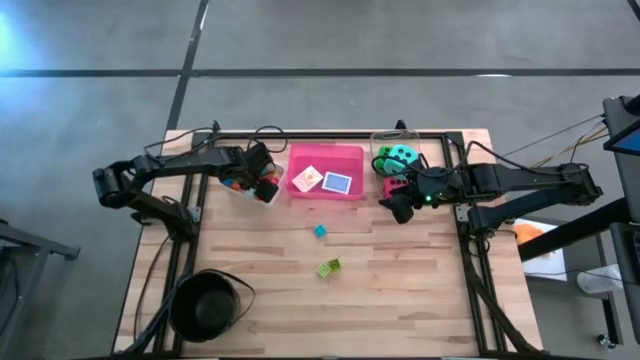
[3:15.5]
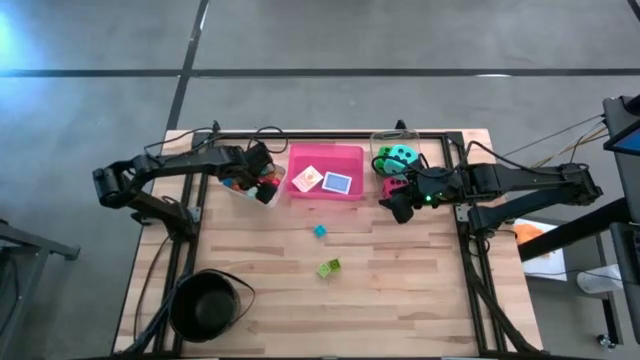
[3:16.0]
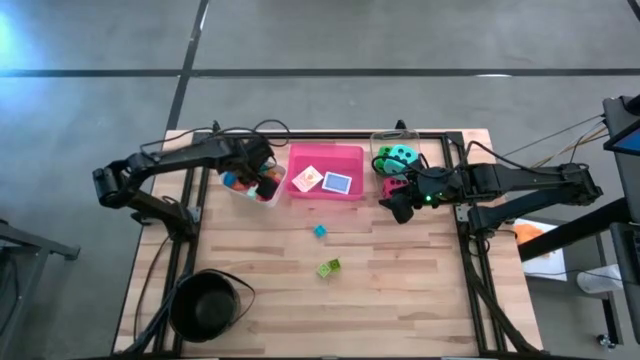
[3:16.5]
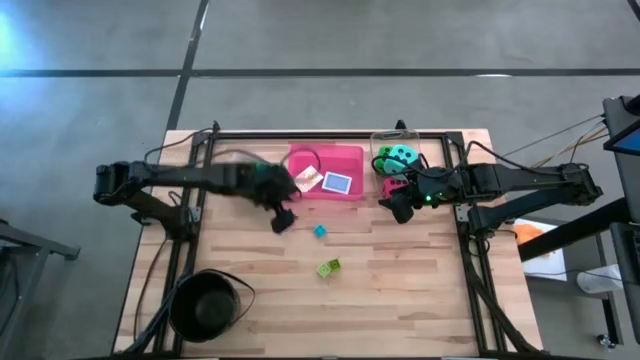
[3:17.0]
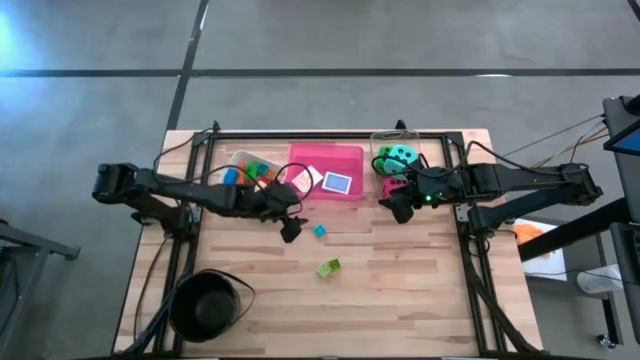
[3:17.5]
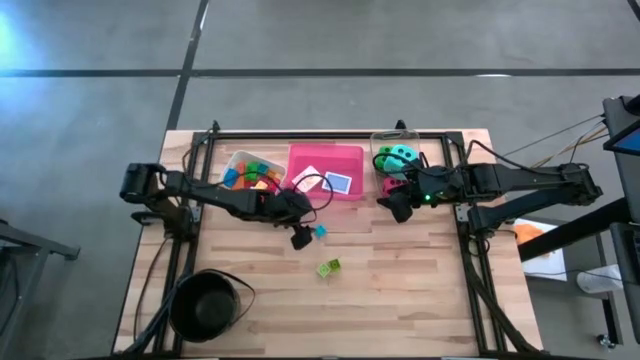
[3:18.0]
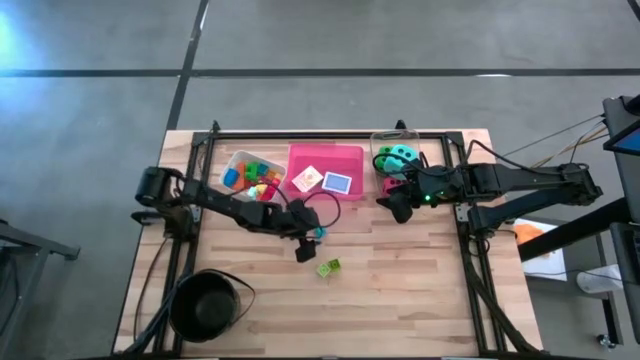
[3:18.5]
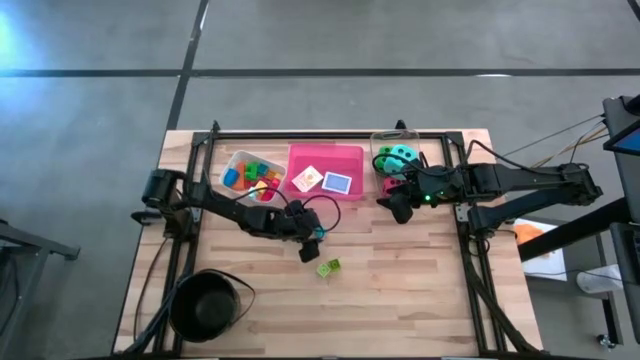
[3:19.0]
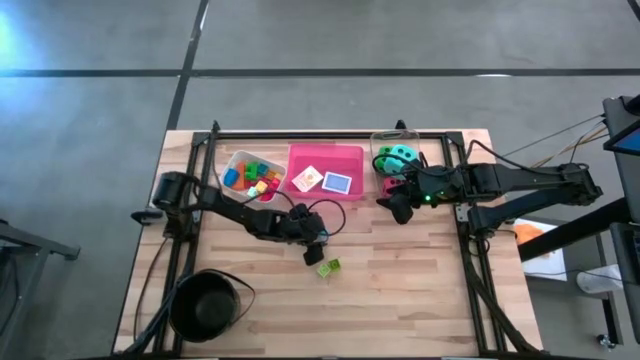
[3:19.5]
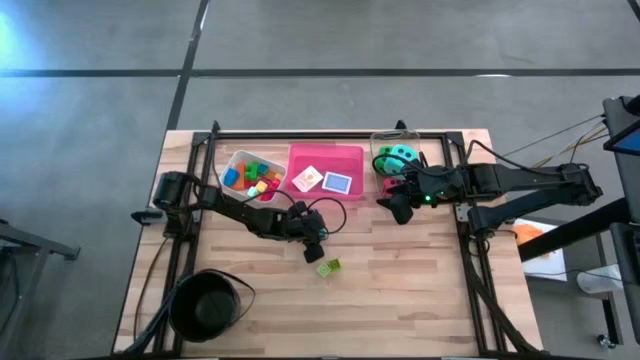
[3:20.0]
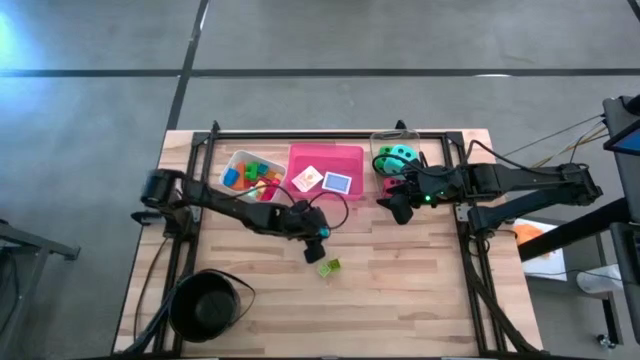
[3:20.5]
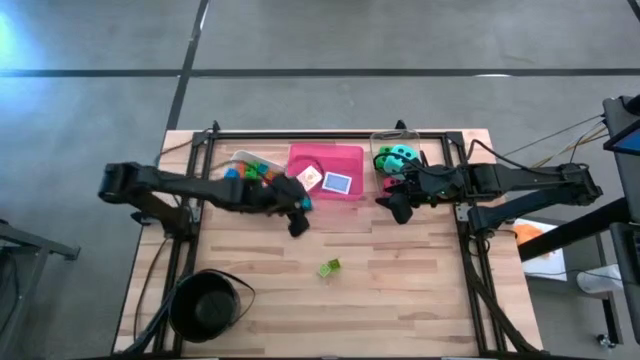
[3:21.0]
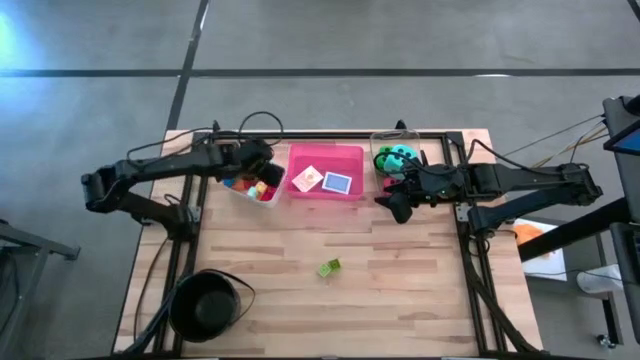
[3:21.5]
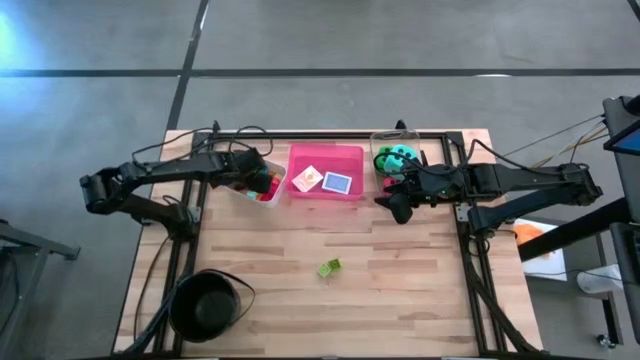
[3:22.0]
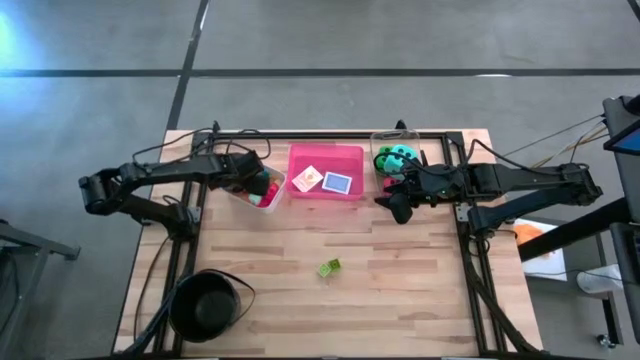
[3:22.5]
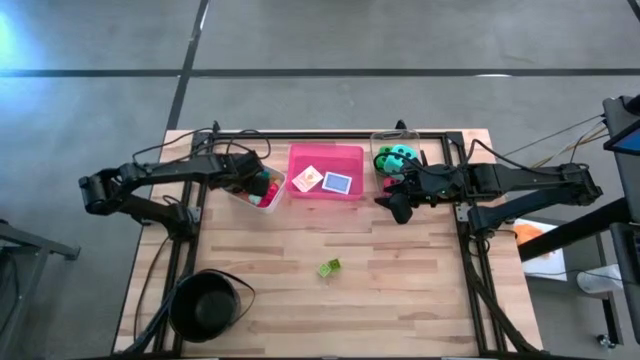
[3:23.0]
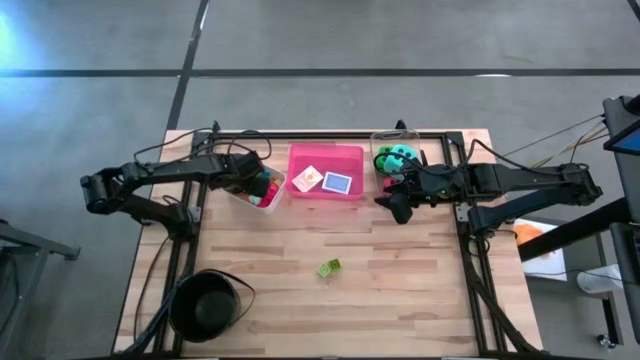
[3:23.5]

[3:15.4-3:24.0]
Task: Pick & Place Toys
Put the blue game piece into the white bin

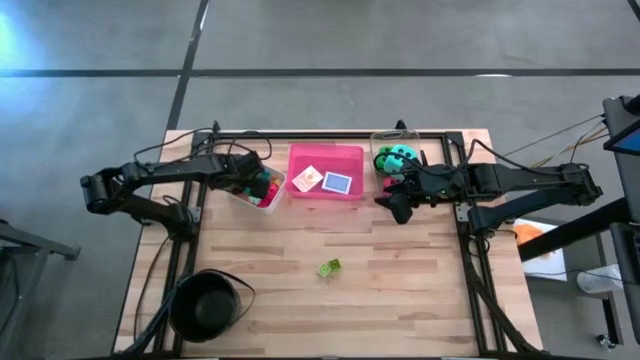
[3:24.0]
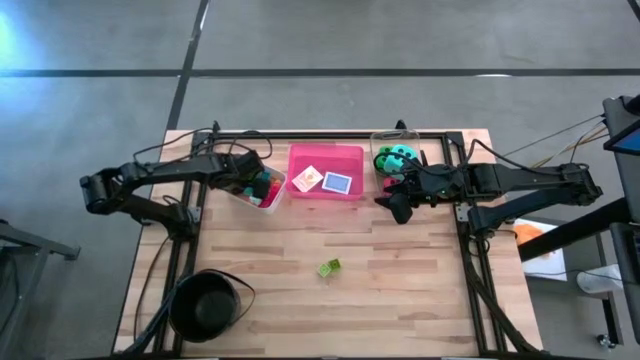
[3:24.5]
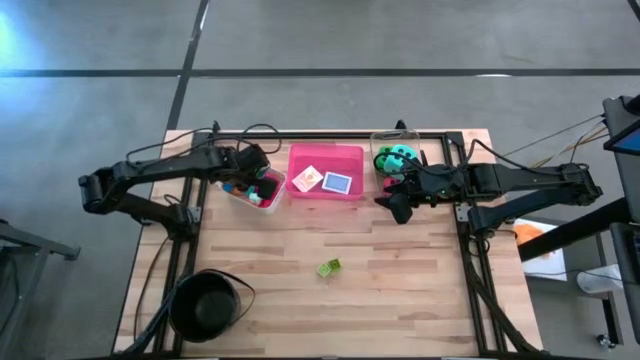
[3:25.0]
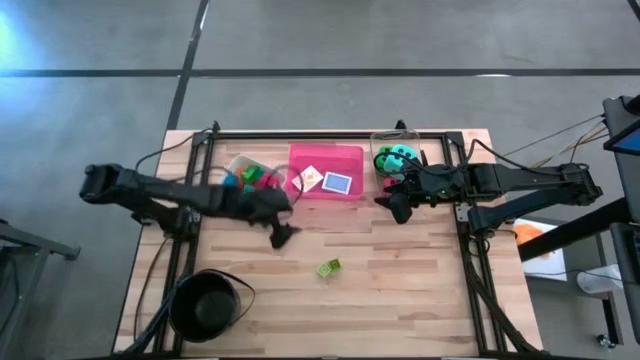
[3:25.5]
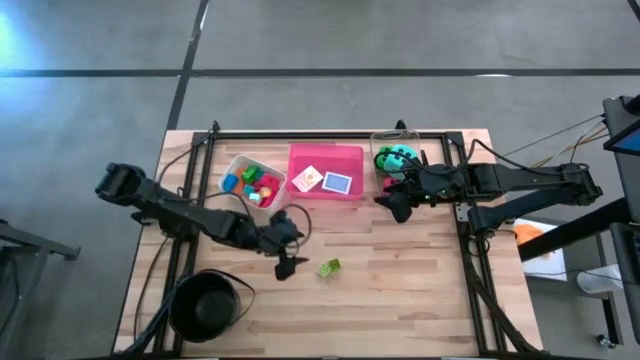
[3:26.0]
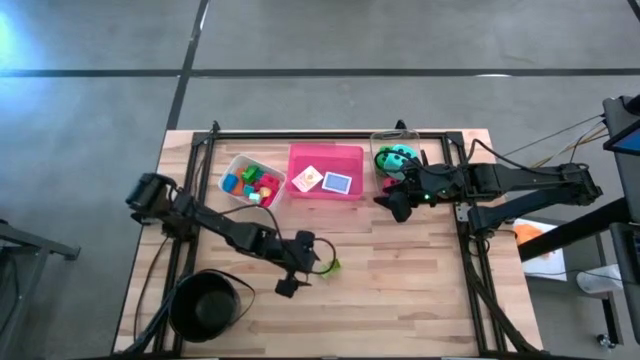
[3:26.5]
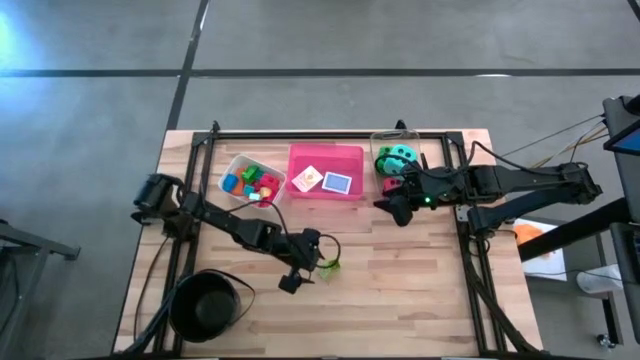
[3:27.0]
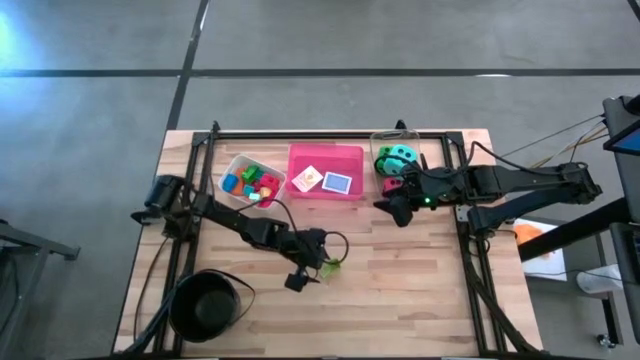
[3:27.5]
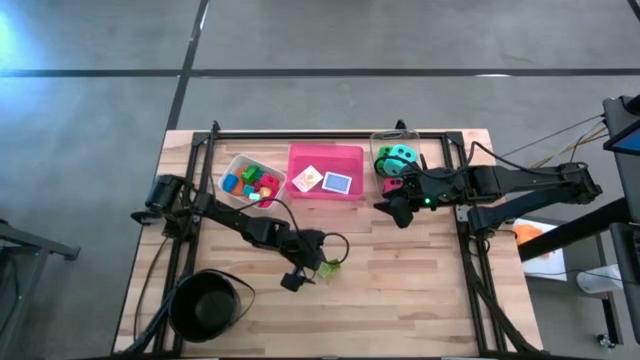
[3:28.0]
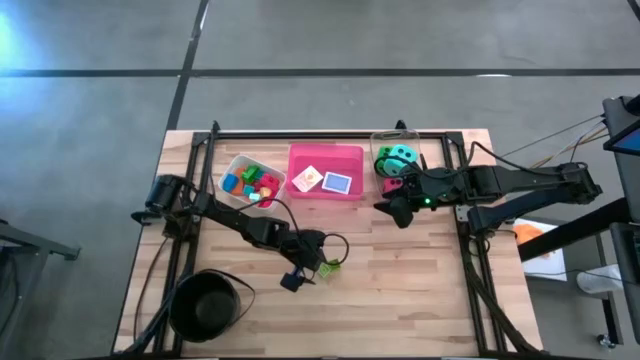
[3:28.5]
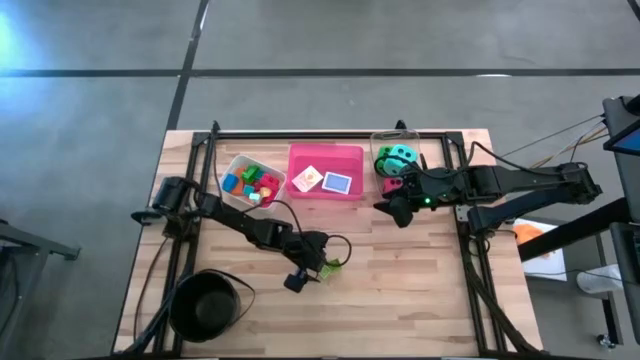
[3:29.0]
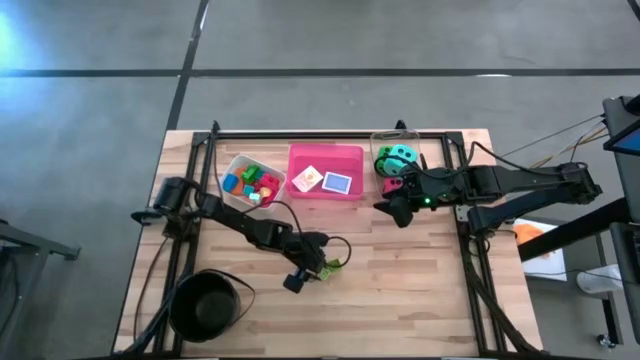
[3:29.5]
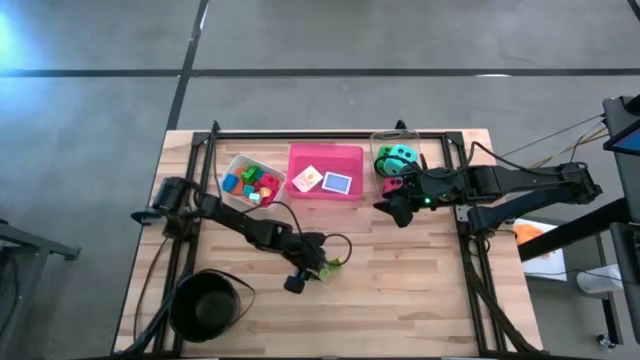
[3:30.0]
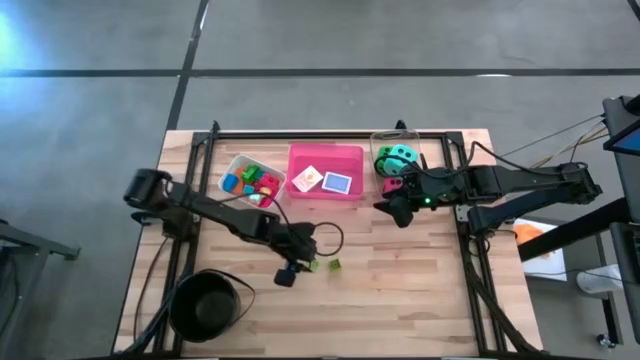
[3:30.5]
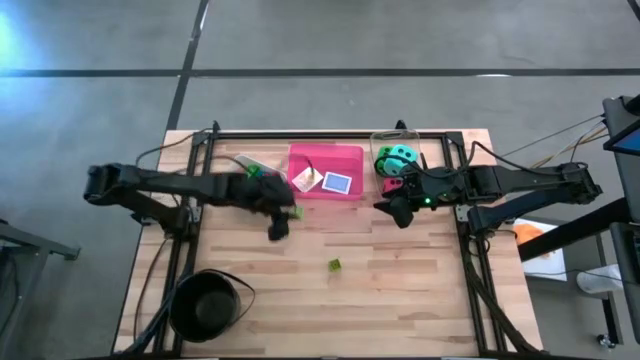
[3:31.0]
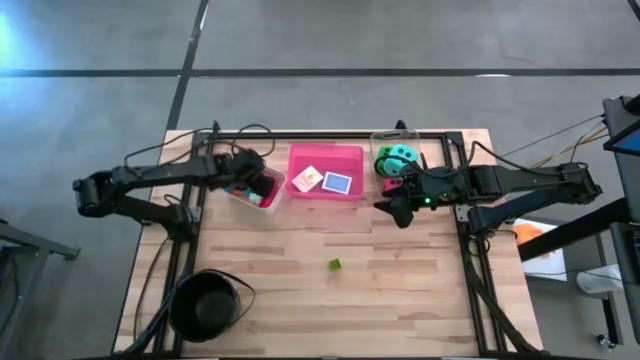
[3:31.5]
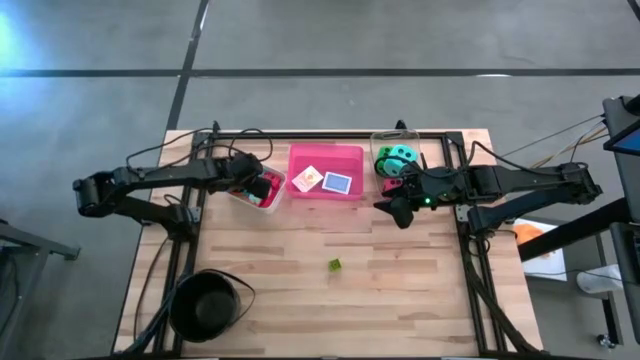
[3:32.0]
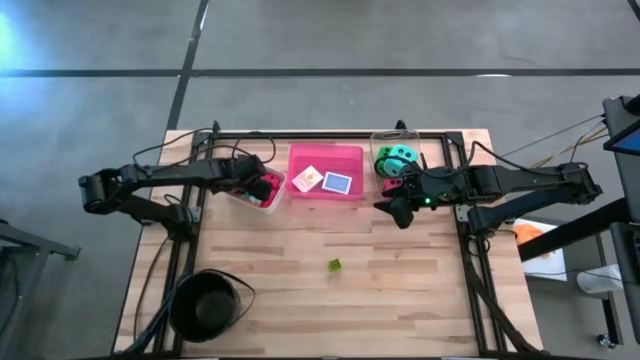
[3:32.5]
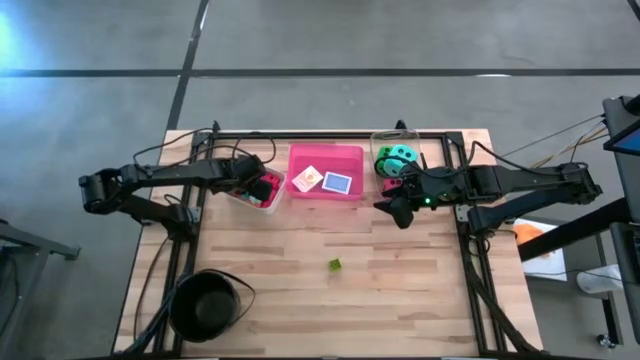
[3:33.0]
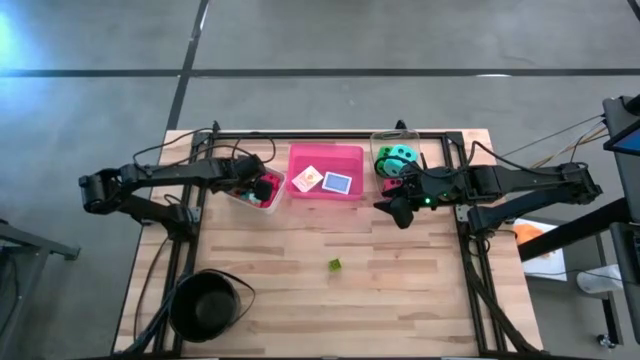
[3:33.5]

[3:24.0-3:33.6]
Put the light green game piece into the white bin

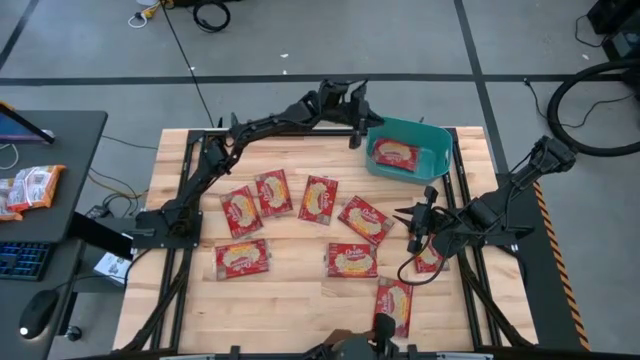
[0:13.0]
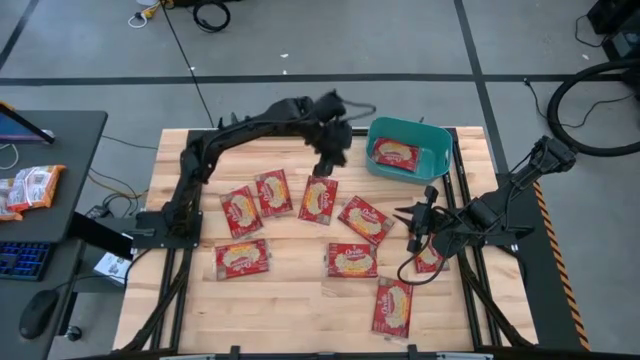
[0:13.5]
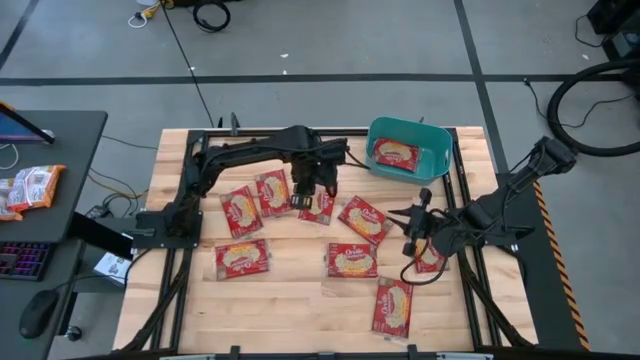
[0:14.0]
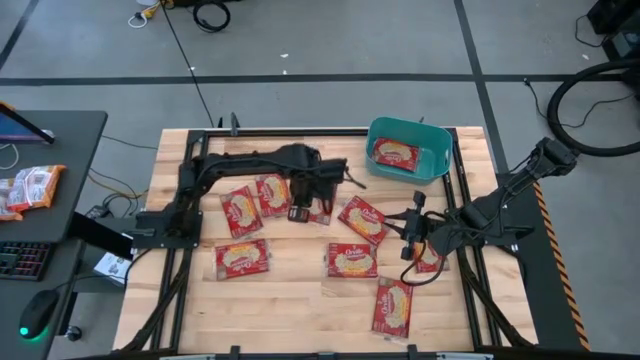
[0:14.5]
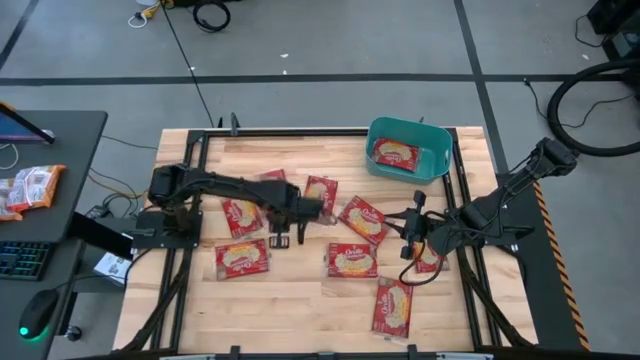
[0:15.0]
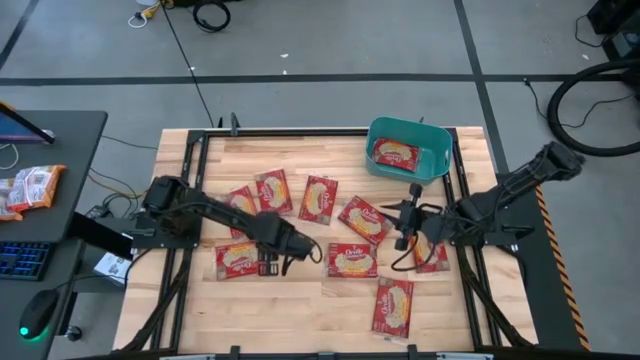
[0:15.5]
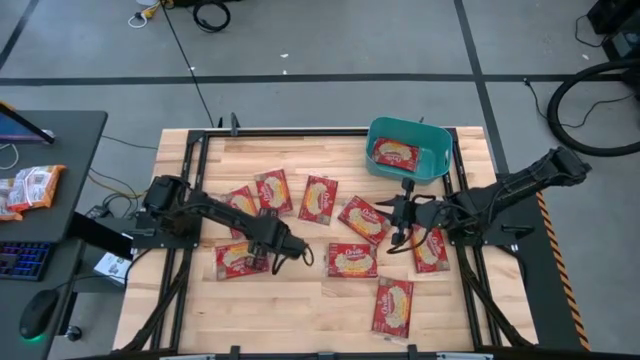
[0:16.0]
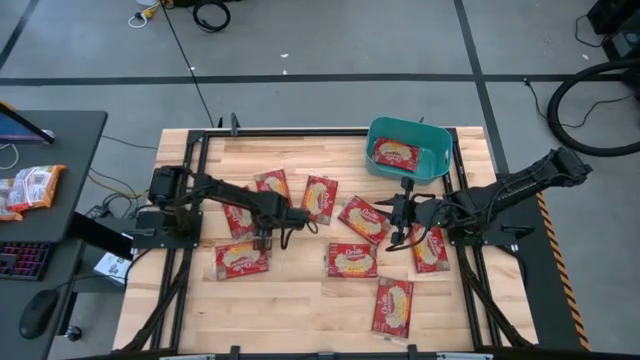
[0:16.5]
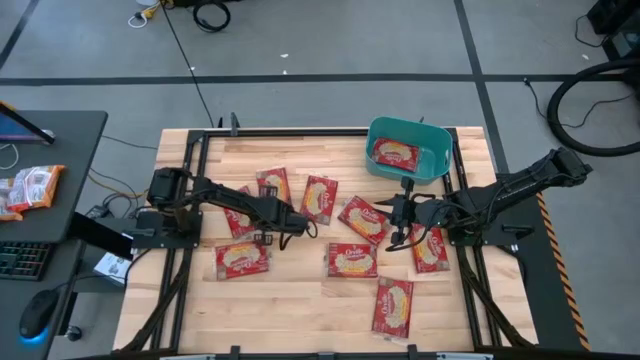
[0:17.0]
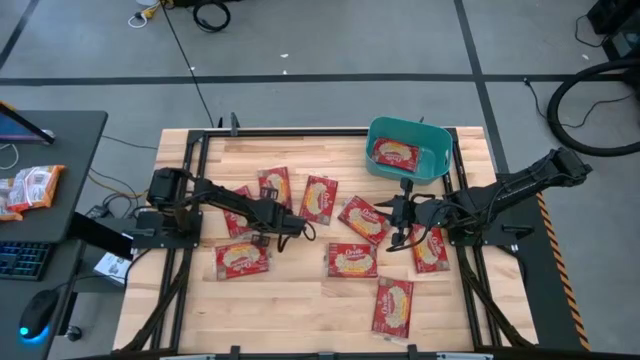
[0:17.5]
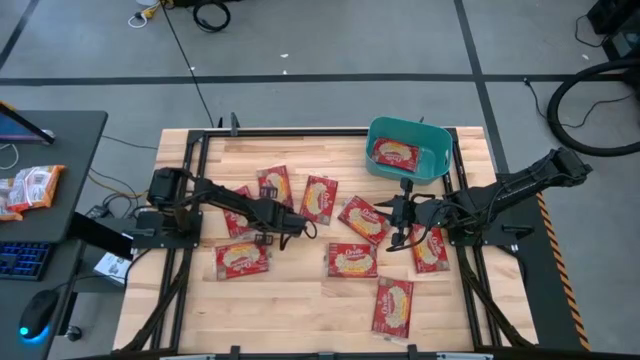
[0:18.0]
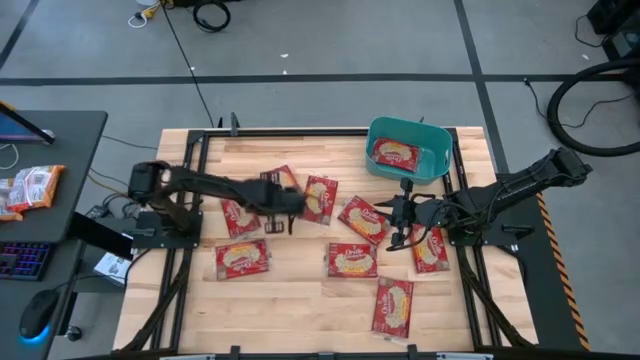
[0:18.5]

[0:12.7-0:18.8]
Task: Sort popcorn bags into baskets
Put the popcorn bag into the blue bin
